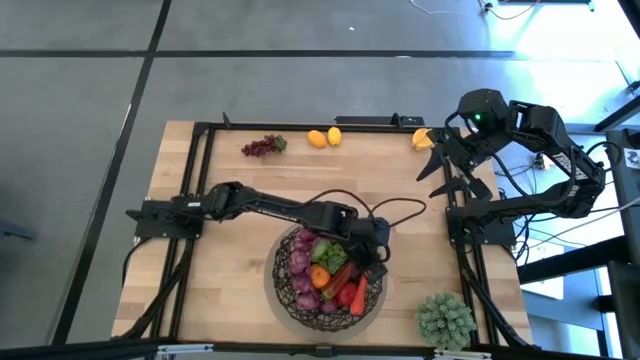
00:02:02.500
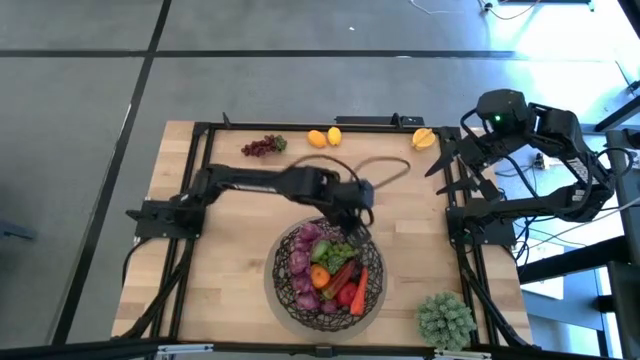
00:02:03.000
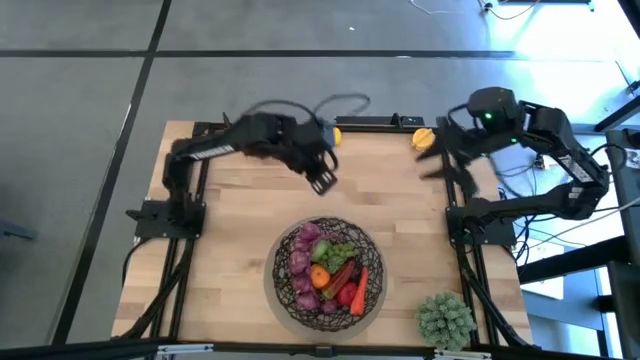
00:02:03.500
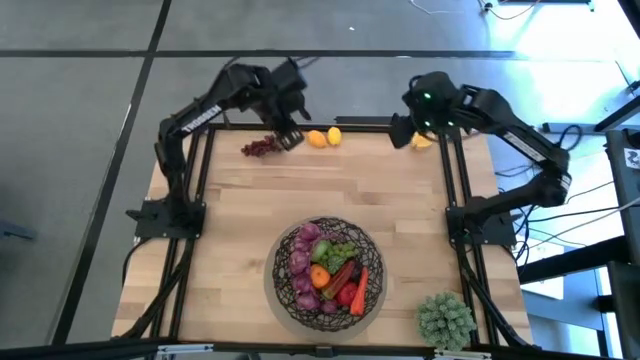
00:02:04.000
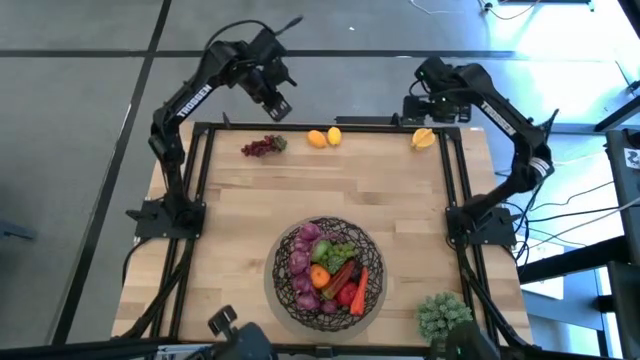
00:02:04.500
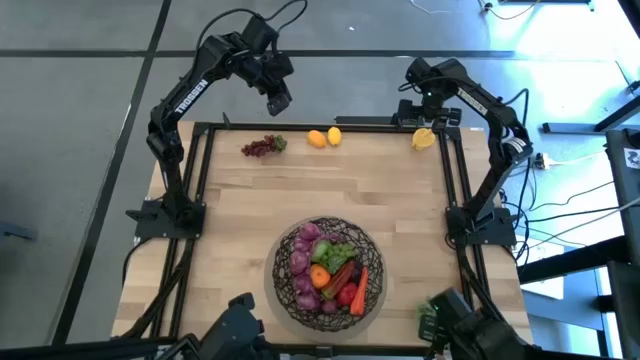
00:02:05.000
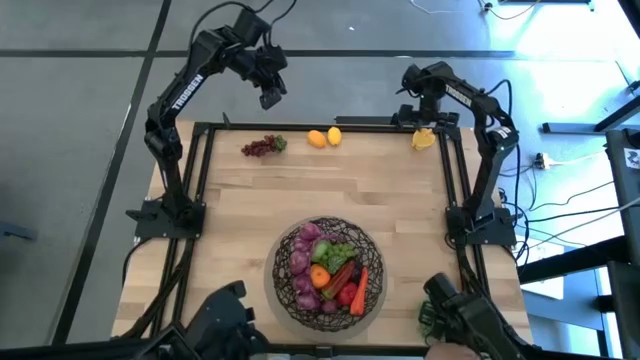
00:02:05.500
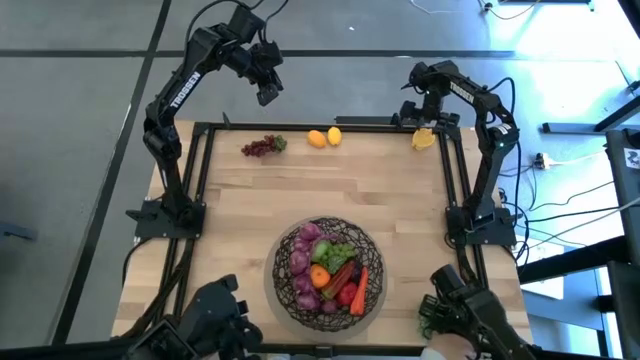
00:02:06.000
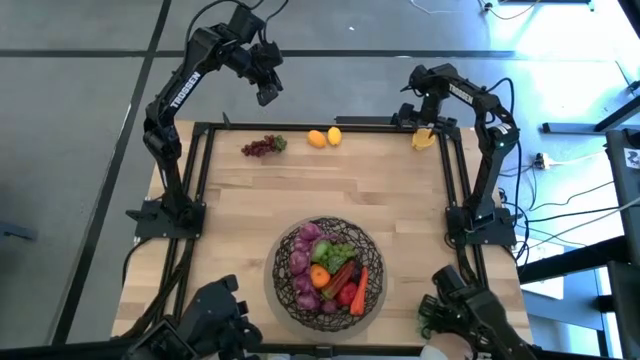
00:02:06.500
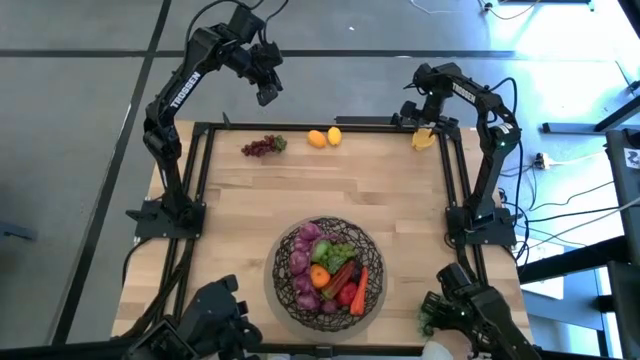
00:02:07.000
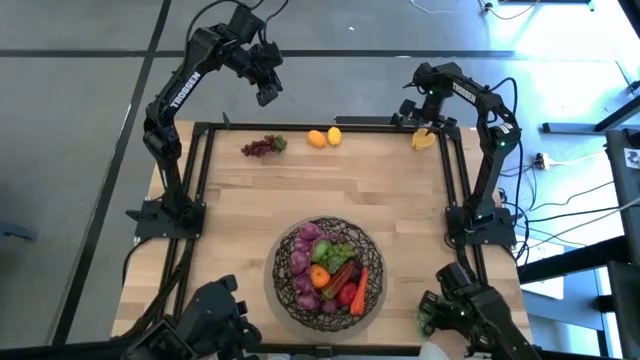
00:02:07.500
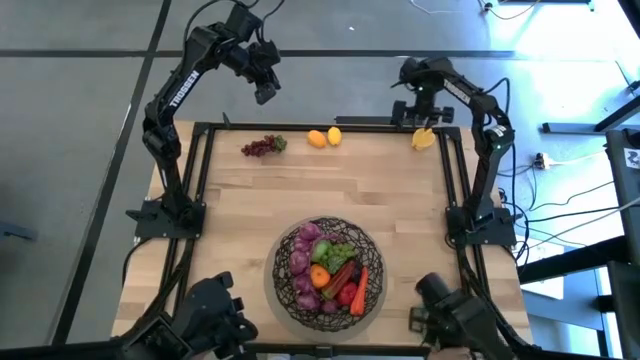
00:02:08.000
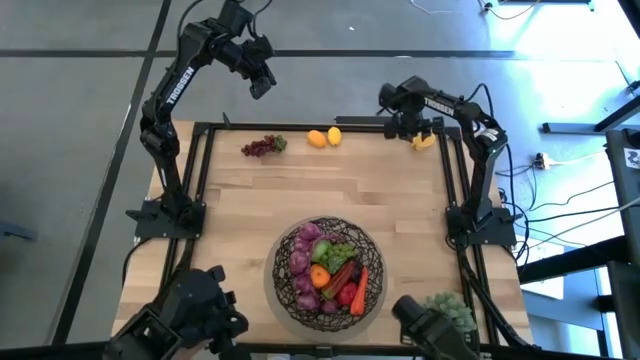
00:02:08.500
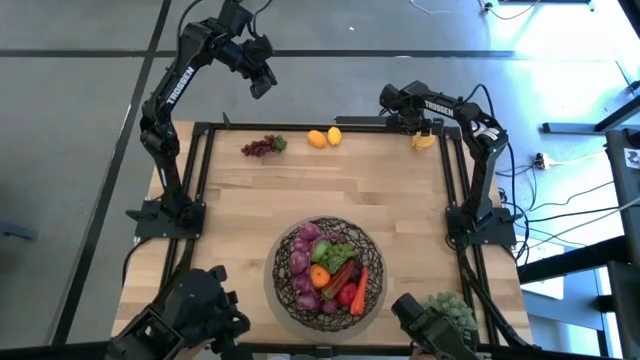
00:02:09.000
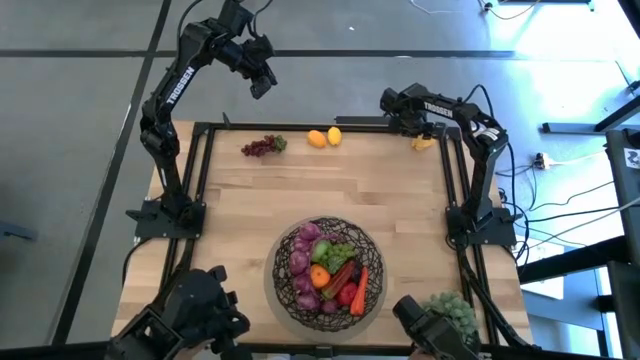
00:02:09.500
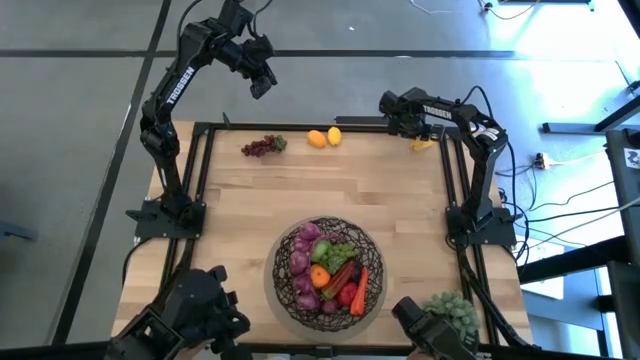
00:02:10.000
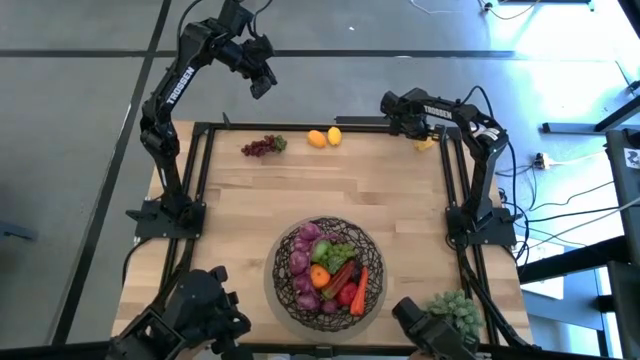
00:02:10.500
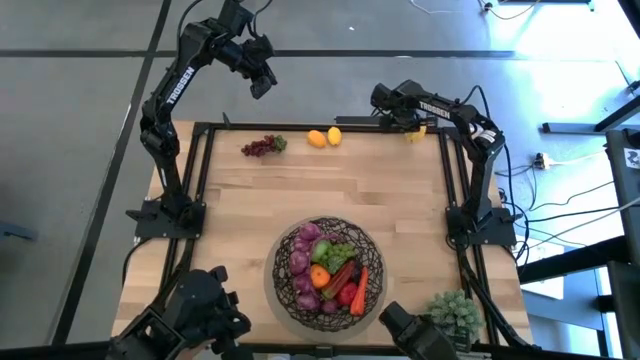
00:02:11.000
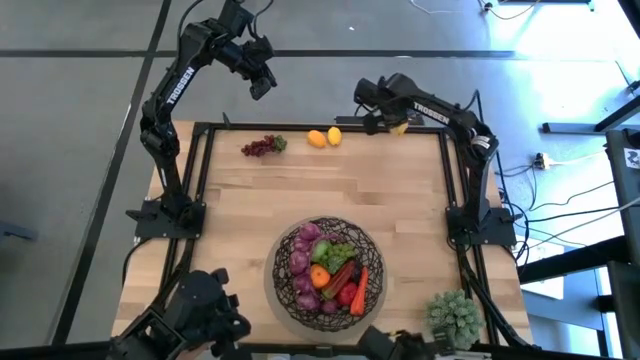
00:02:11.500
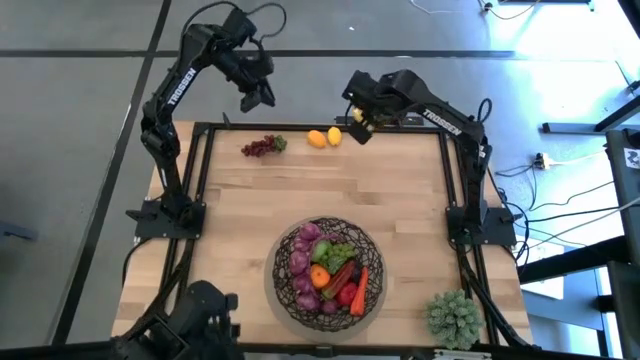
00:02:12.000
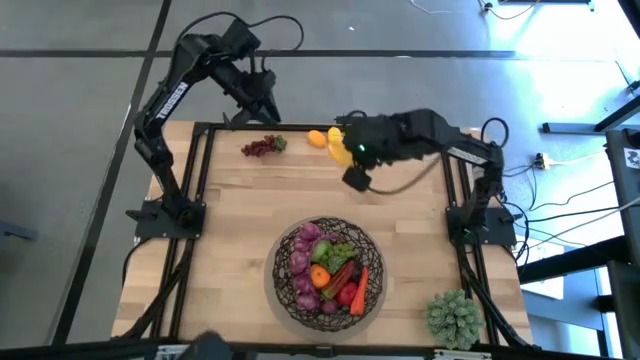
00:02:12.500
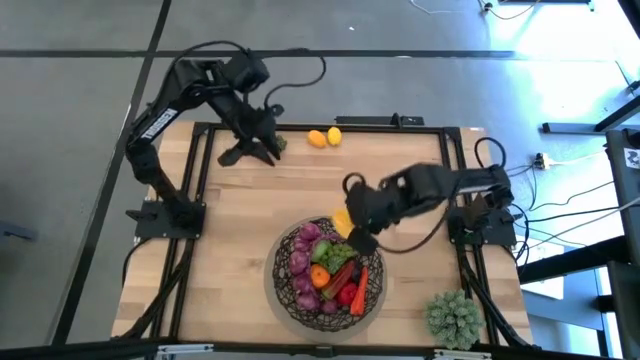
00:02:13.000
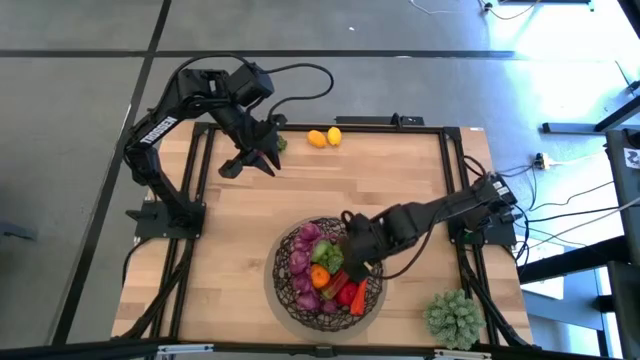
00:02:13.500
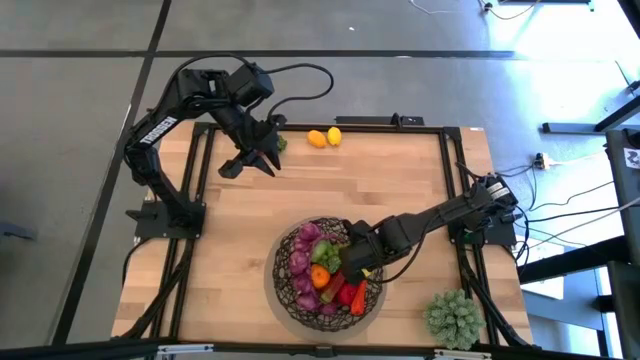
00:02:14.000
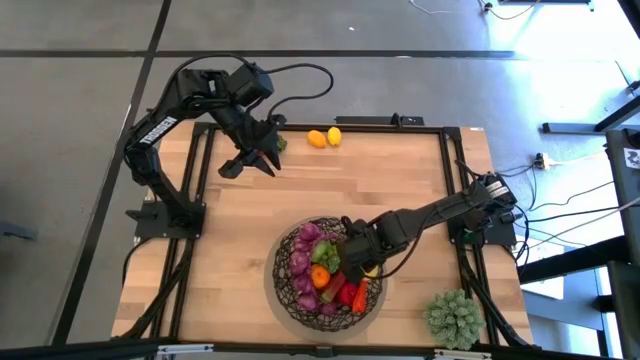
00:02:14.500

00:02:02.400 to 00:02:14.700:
Task: Build produce basket
Put the starfruit into the mesh basket

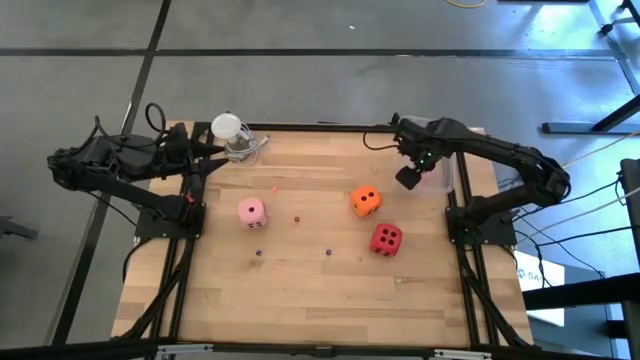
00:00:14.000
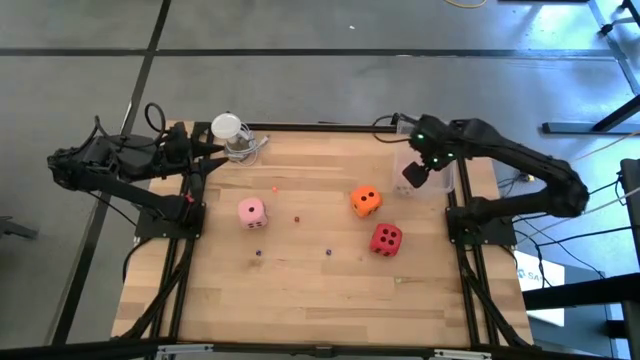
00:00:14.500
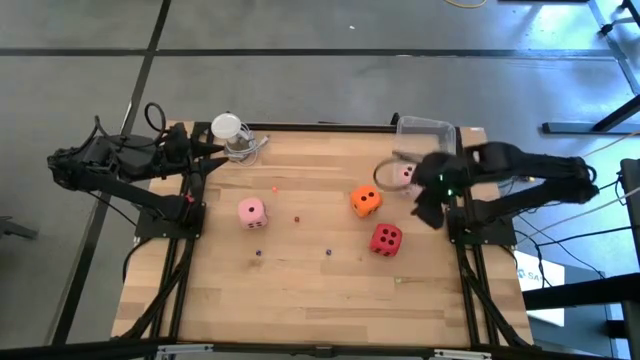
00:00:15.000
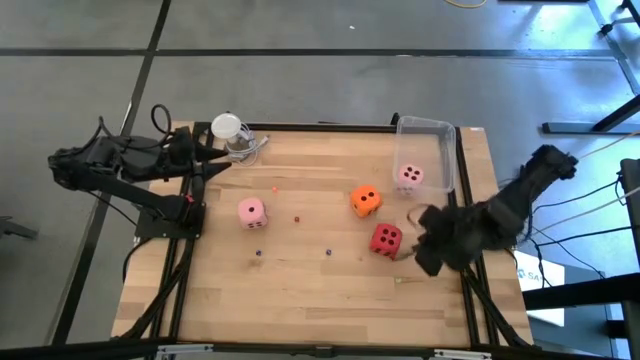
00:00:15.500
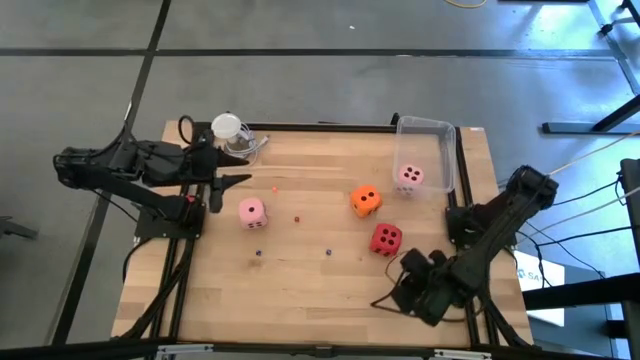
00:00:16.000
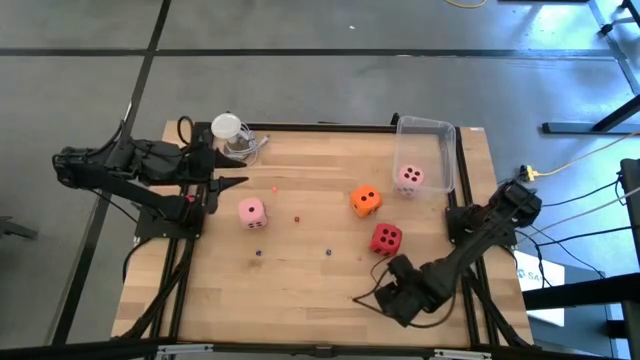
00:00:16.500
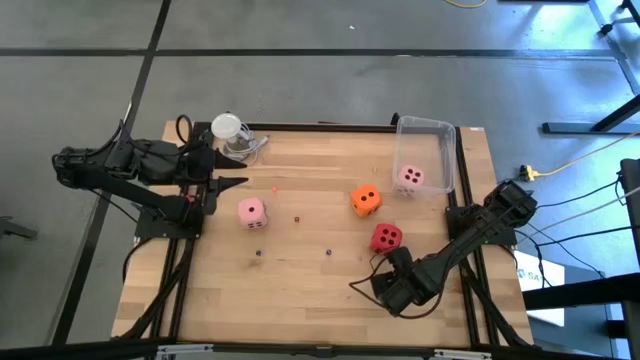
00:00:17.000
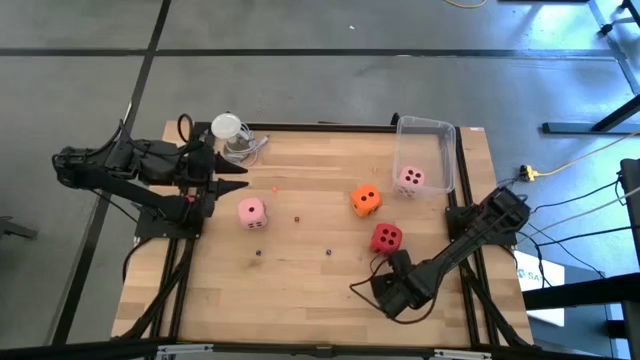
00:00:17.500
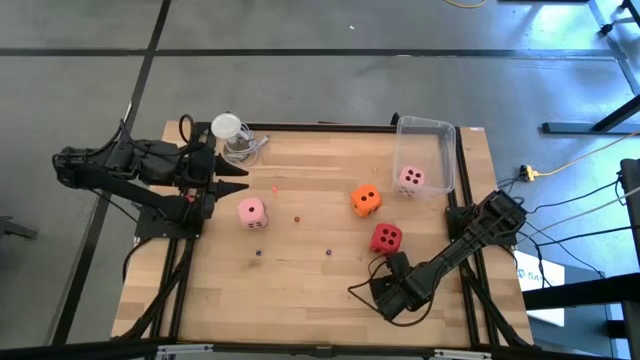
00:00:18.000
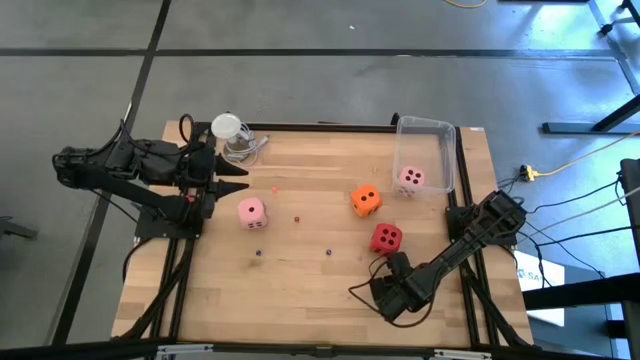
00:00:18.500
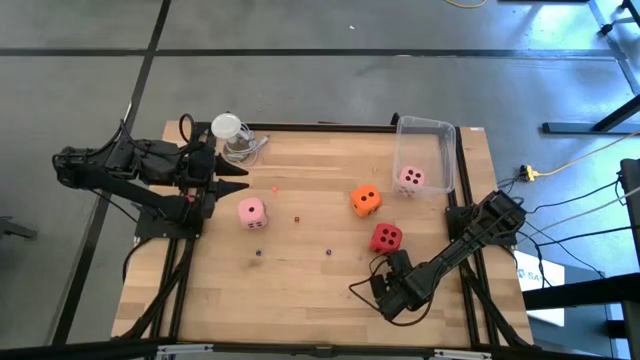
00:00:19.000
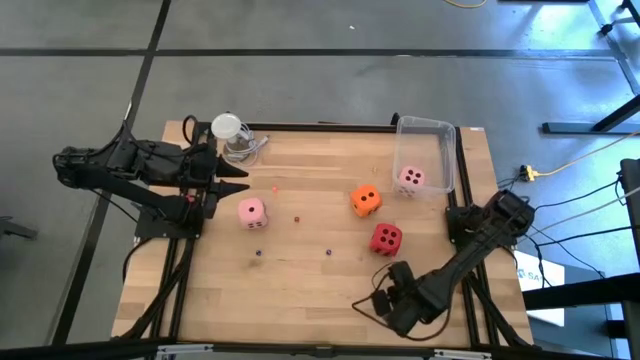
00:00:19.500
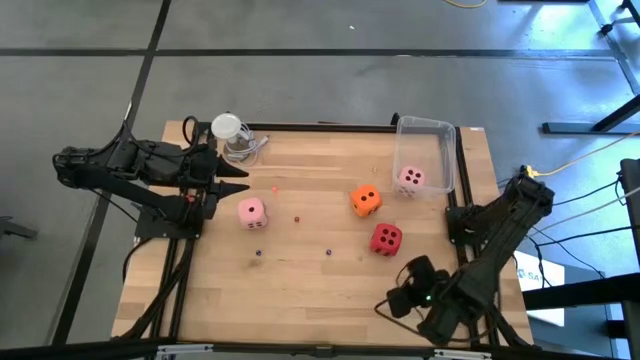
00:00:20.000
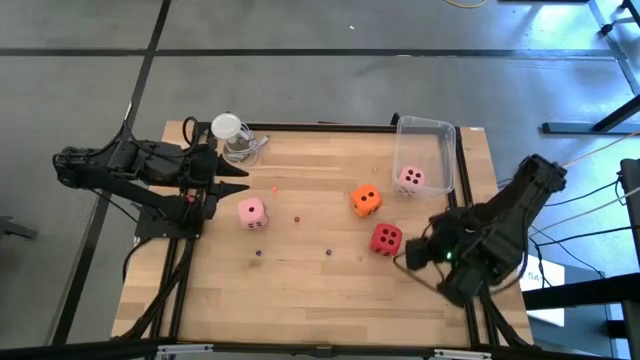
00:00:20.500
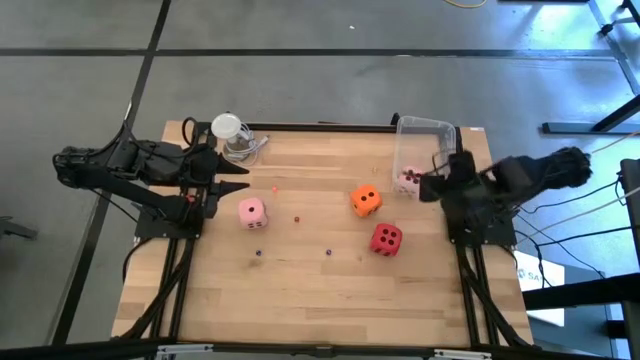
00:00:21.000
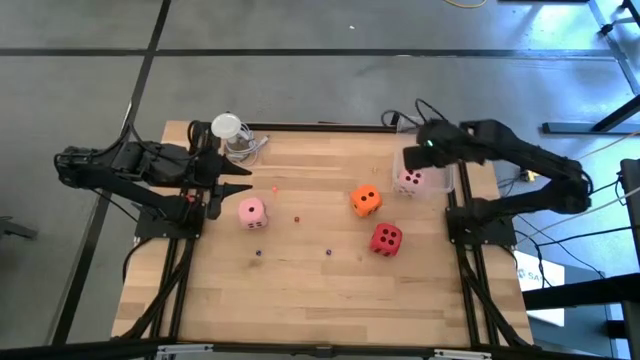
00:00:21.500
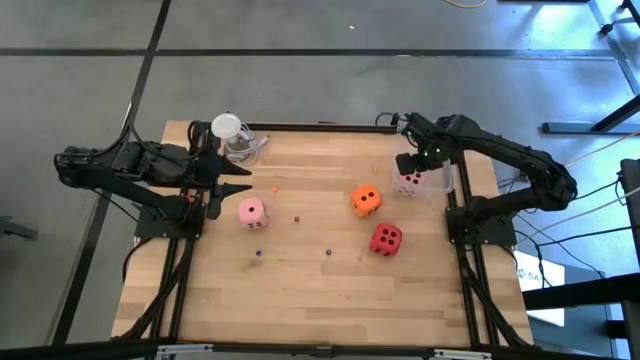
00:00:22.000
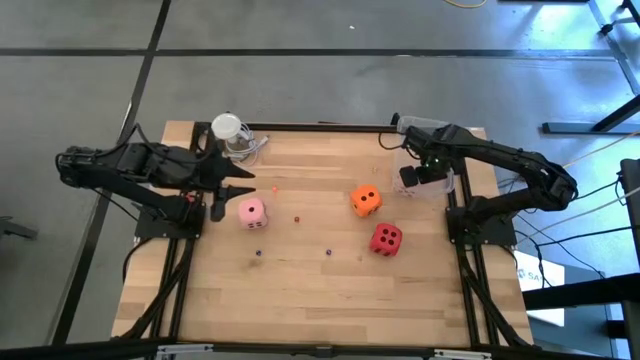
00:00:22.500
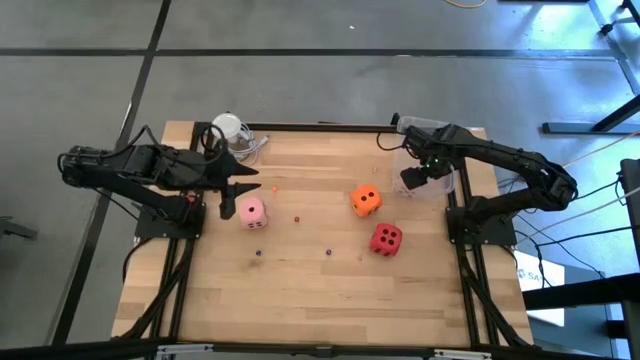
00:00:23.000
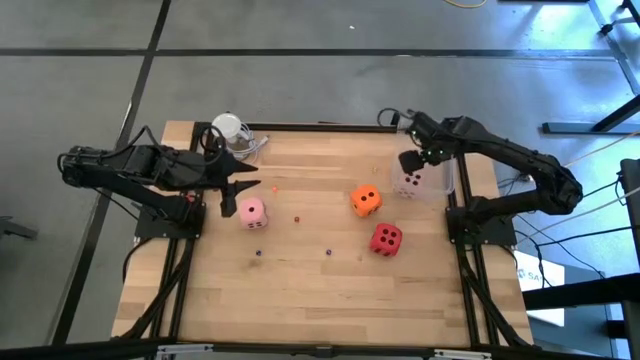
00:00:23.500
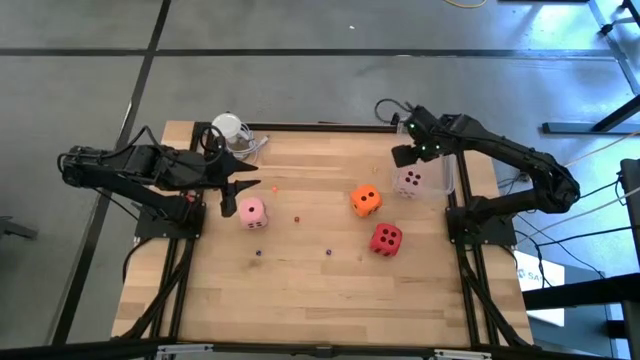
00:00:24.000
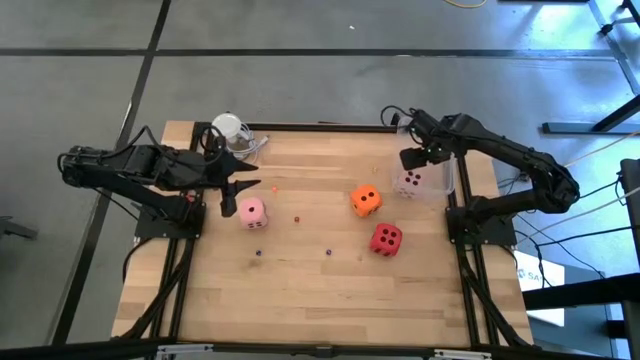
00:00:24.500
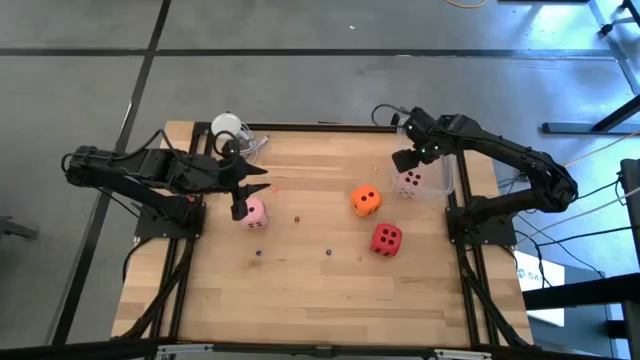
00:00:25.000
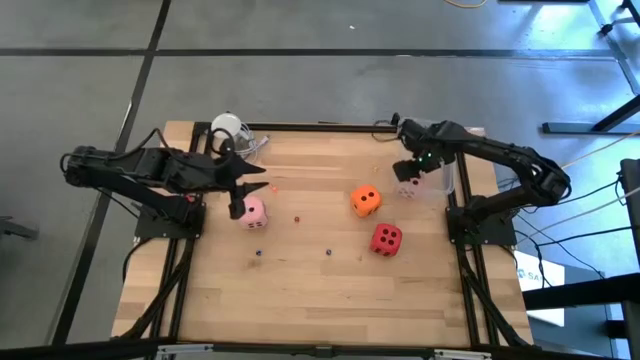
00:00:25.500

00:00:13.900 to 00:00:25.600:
Task: Pick & Place Dice
Put the small green die into the container
